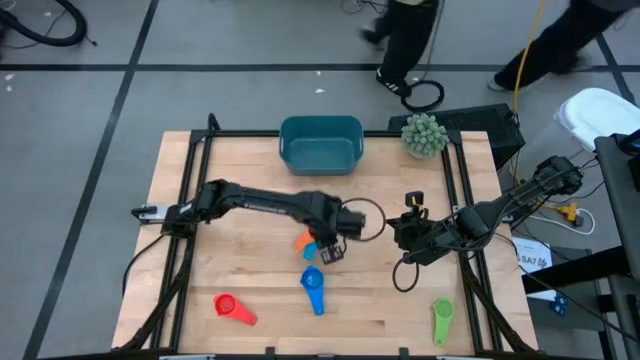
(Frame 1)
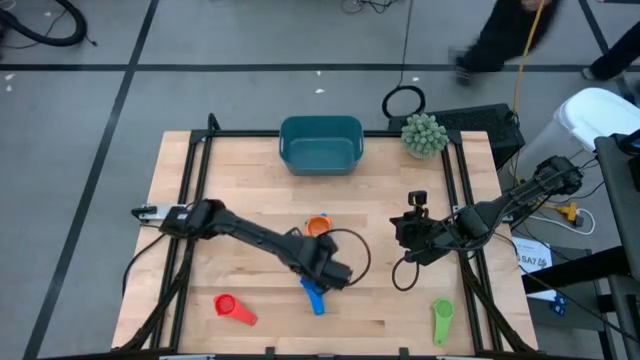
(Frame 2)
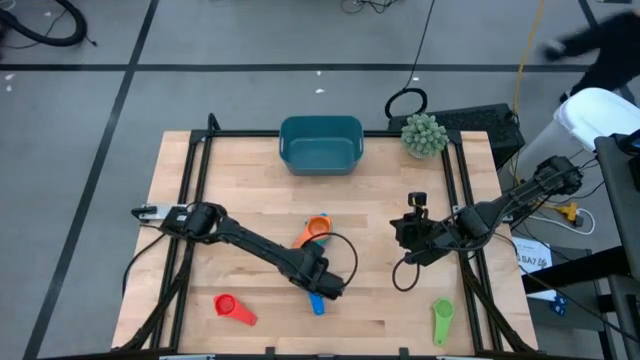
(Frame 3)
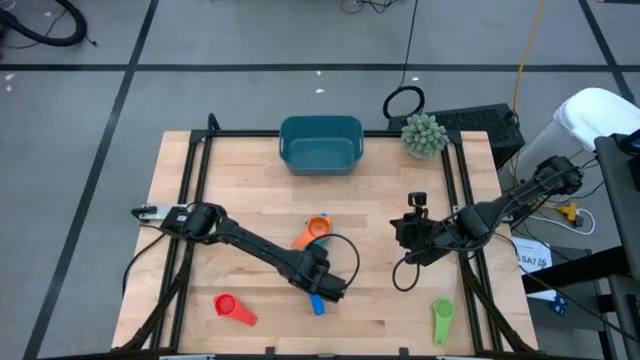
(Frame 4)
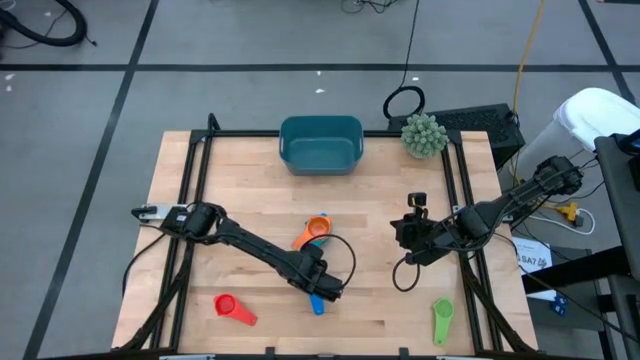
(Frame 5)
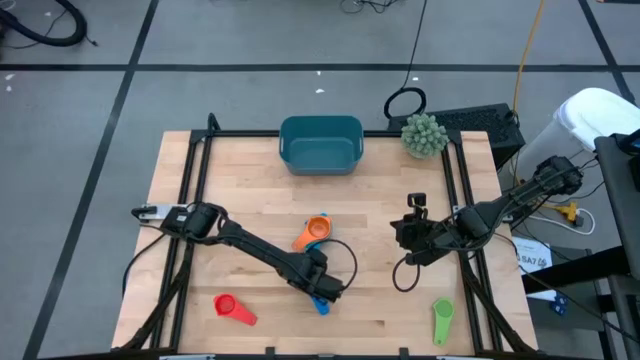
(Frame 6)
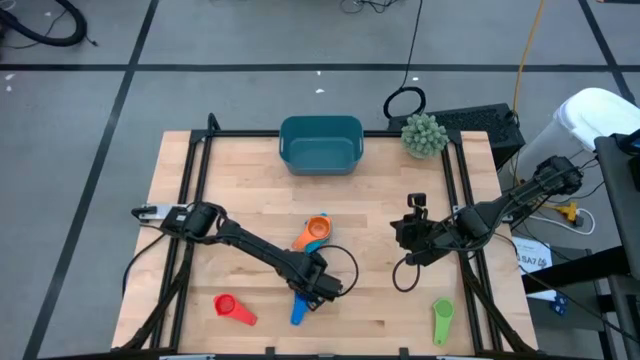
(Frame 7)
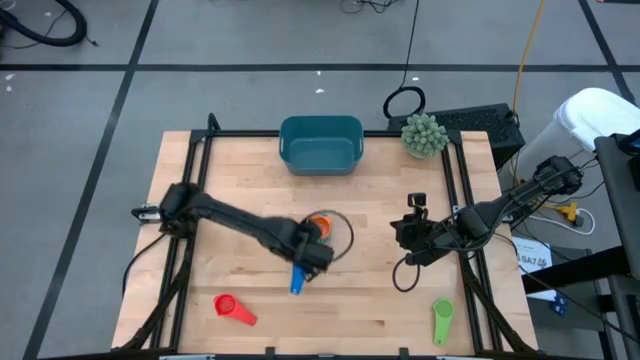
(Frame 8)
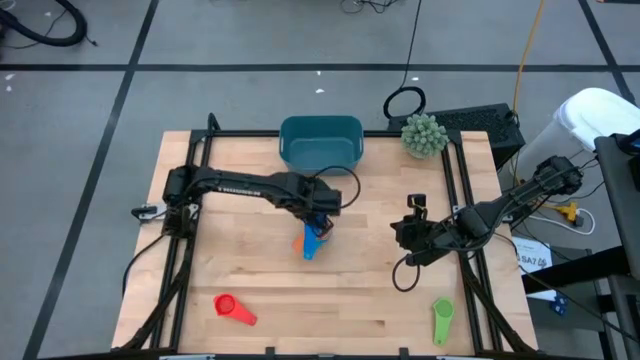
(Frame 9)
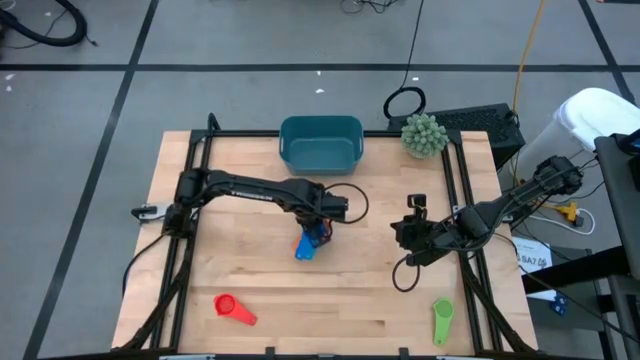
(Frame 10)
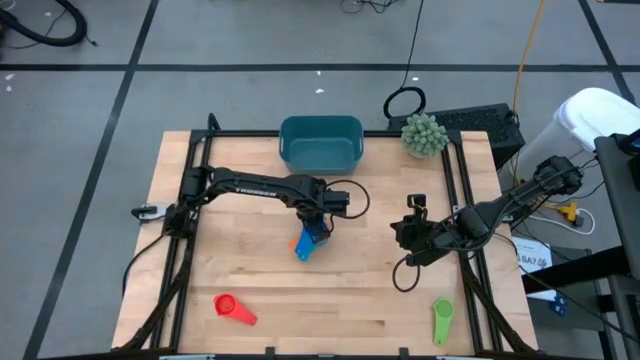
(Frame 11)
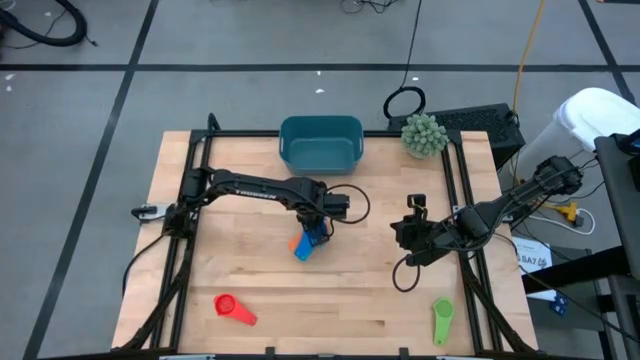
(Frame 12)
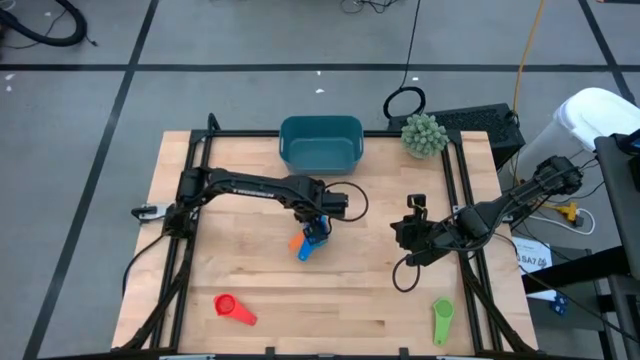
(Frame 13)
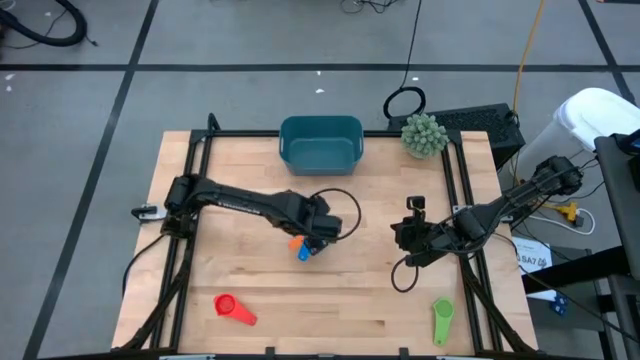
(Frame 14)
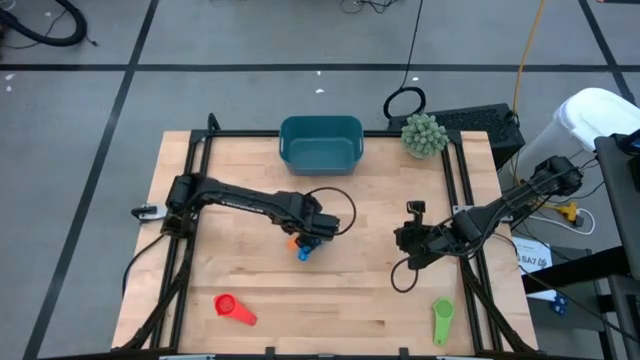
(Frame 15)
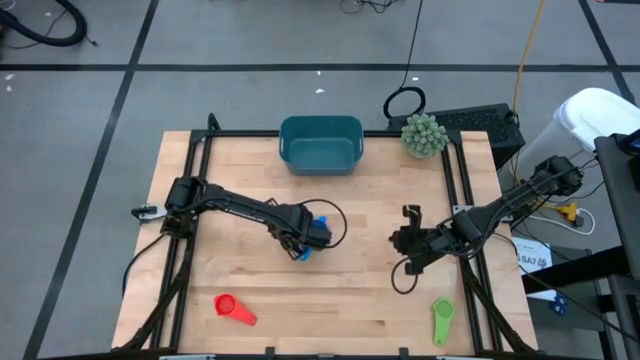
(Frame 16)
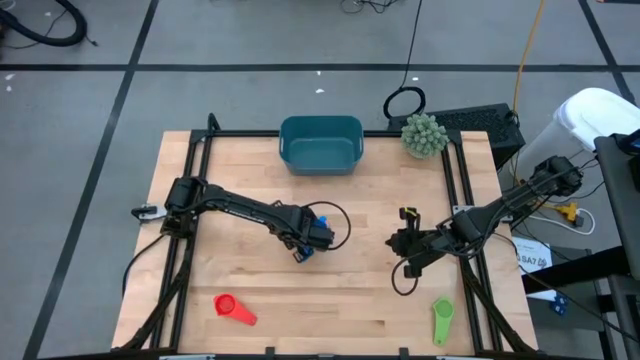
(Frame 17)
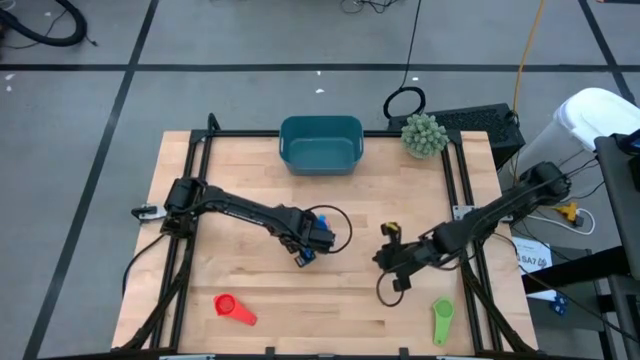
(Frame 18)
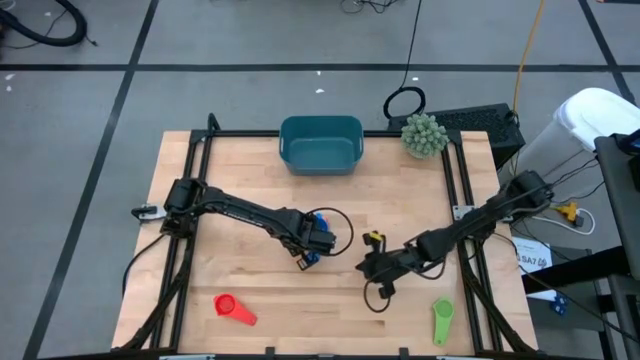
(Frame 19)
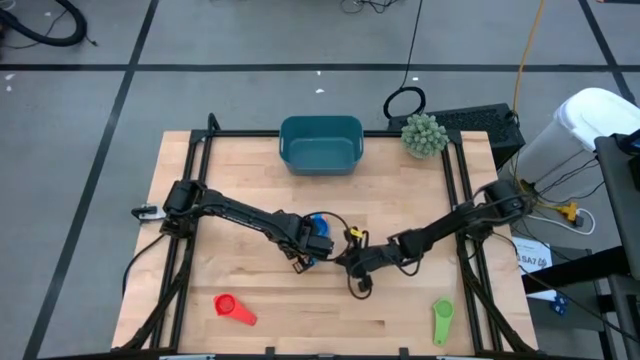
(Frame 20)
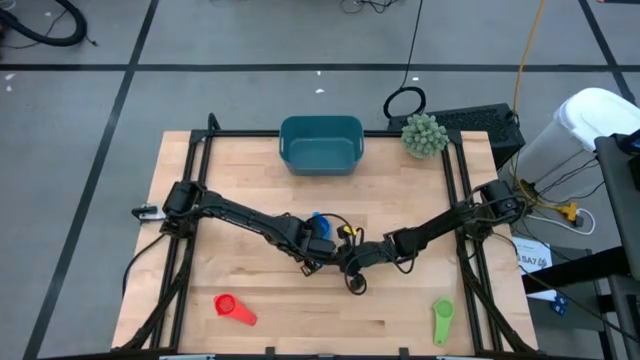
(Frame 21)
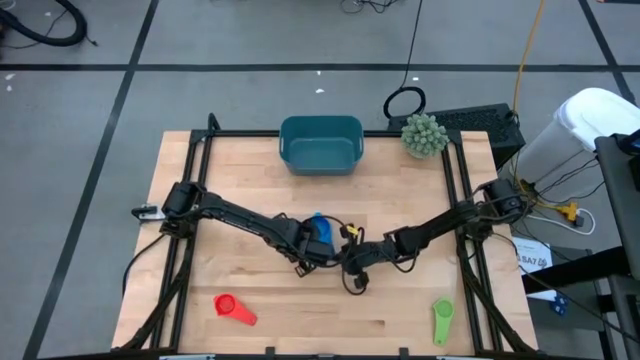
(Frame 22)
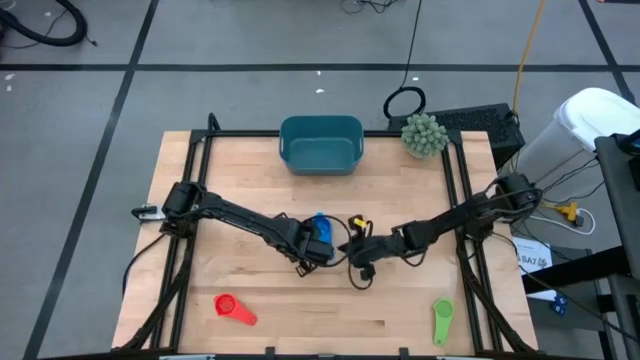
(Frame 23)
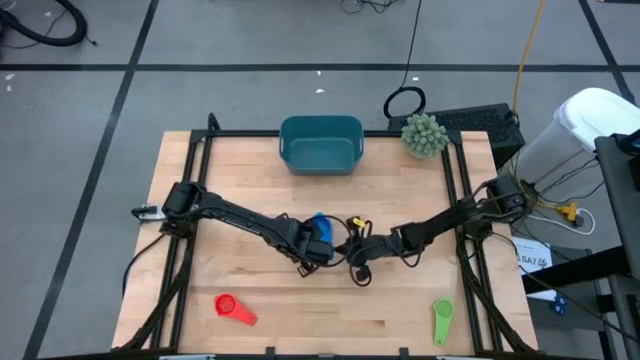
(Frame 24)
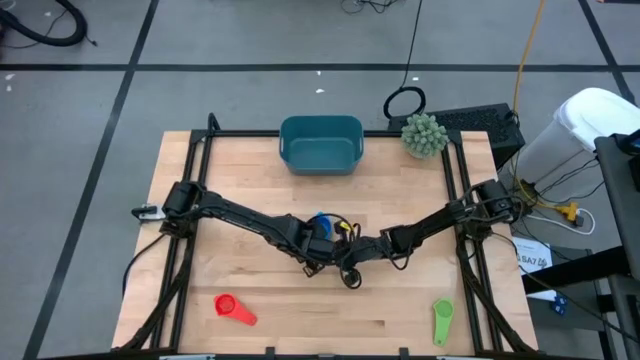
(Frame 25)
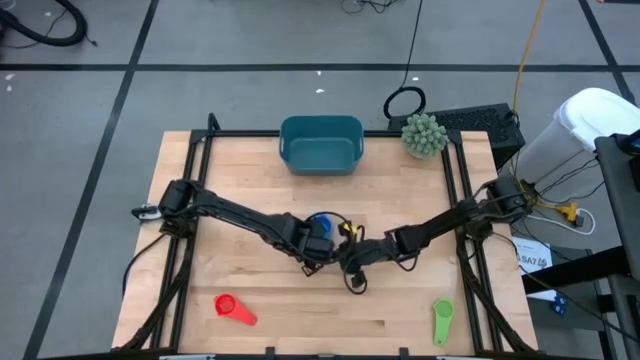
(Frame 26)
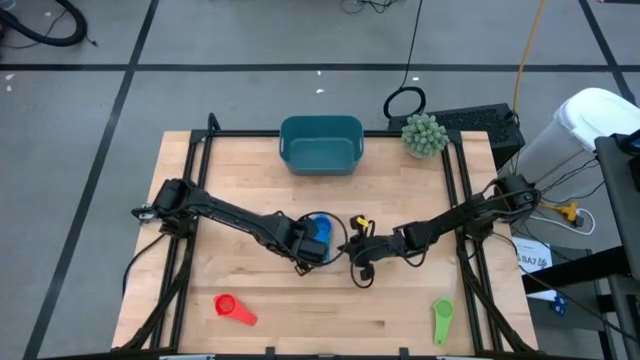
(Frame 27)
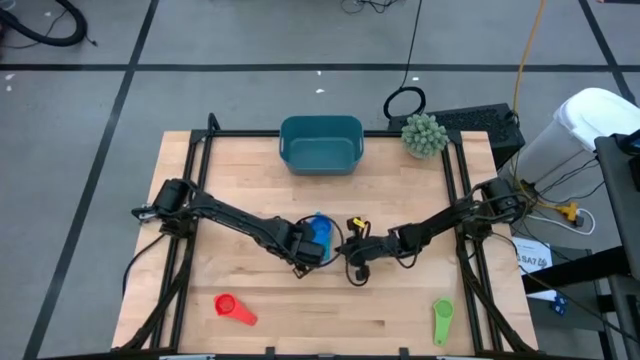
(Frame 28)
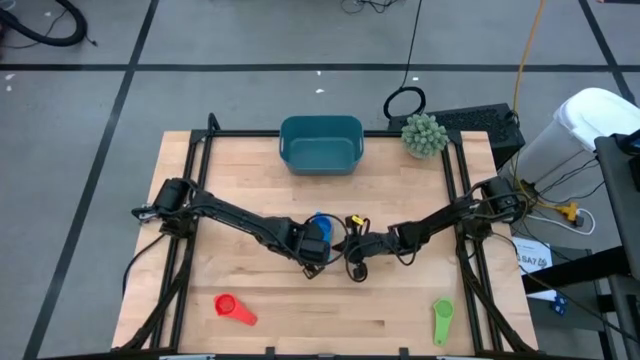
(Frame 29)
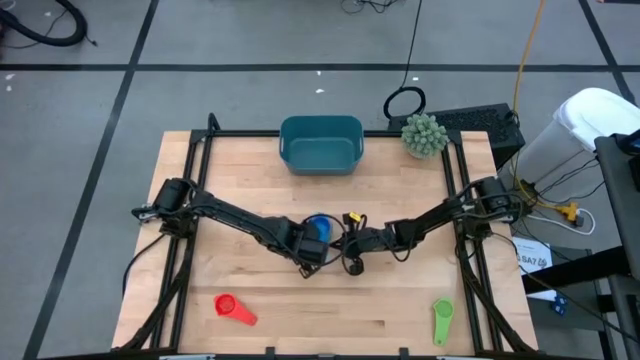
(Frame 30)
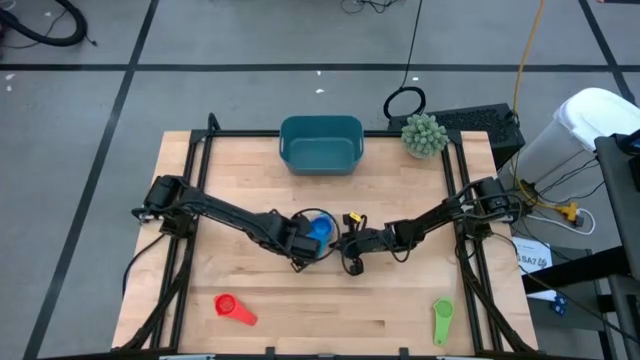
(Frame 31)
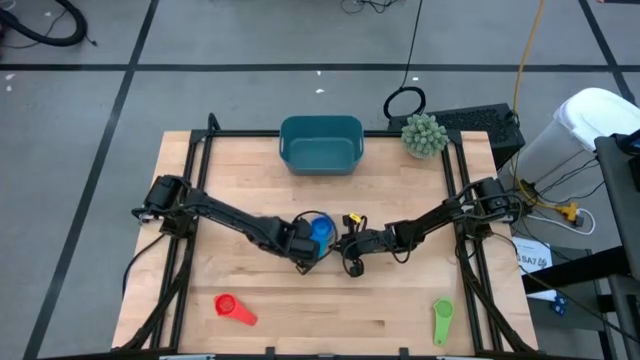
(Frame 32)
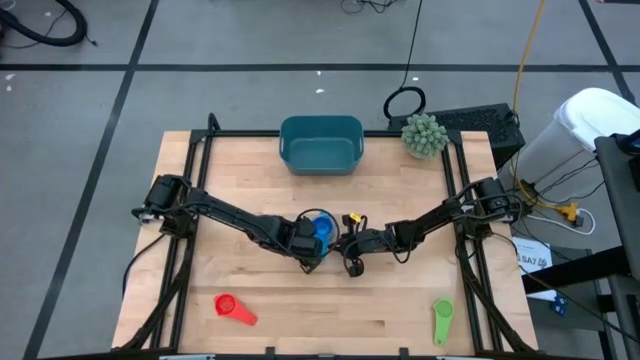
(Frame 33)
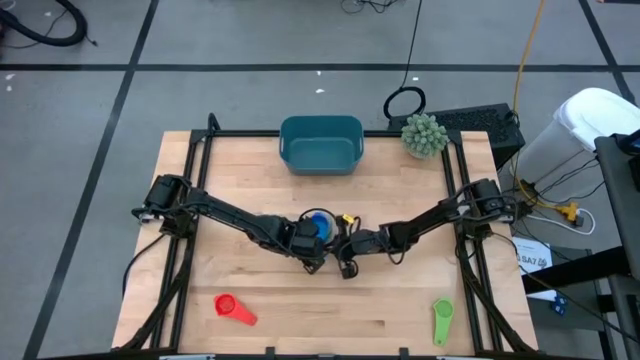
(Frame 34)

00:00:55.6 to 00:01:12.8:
Task: Nest measuring cups in basket
Stack the blue measuring cup on top of the orange measuring cup

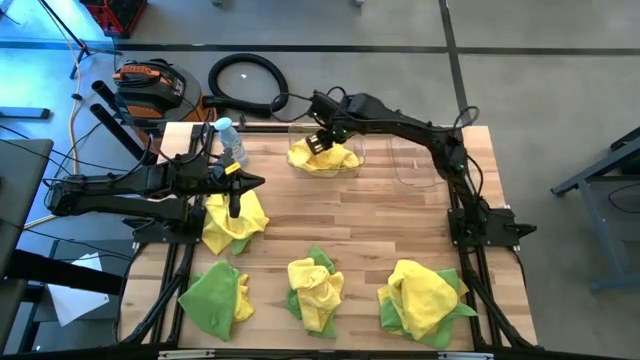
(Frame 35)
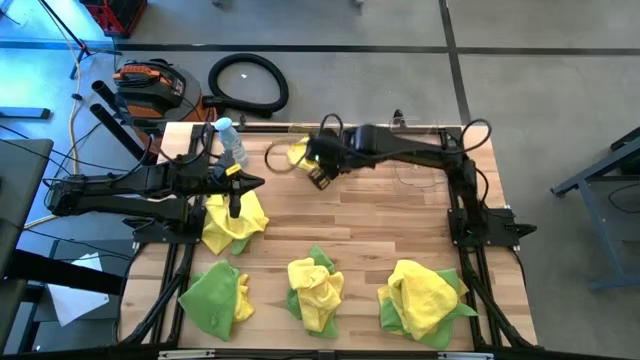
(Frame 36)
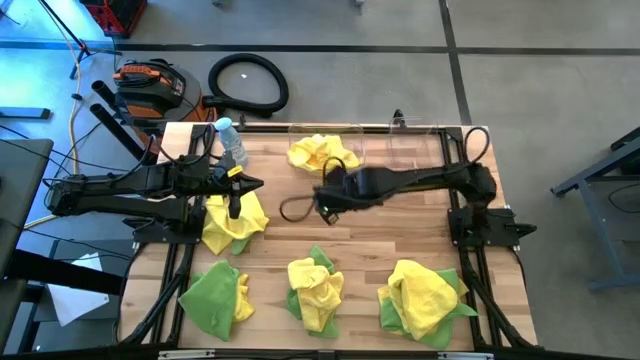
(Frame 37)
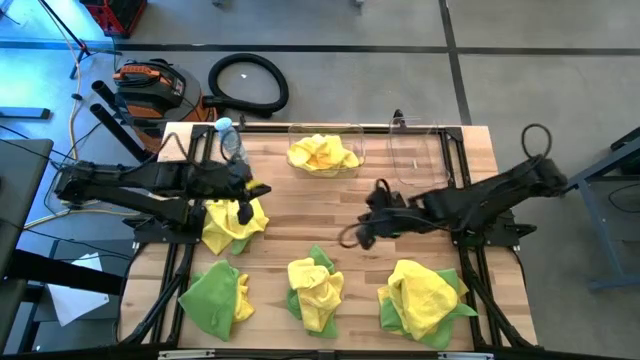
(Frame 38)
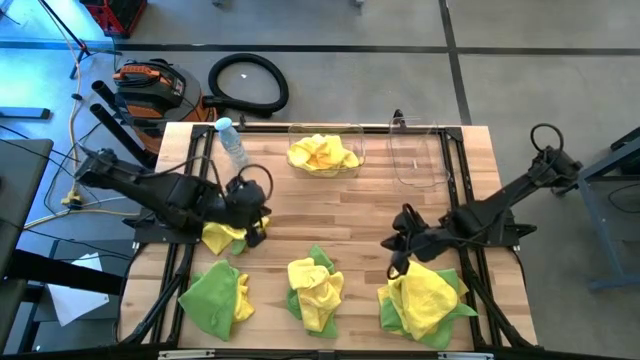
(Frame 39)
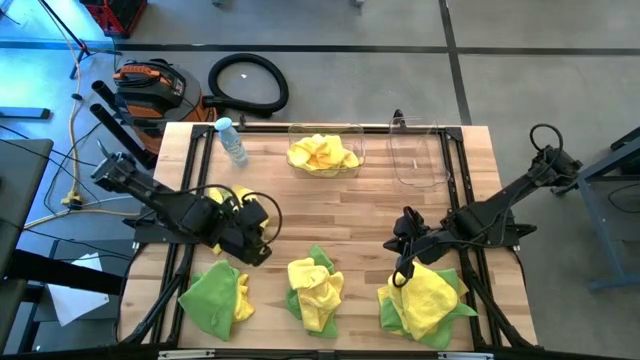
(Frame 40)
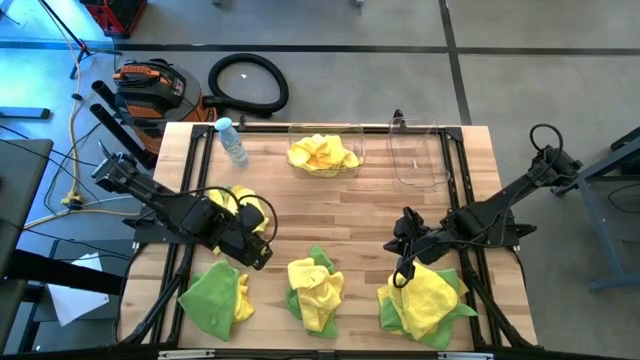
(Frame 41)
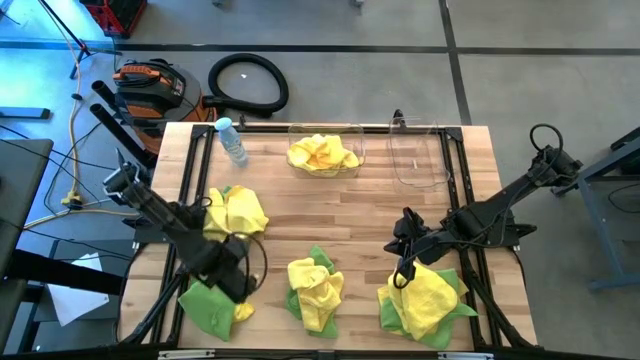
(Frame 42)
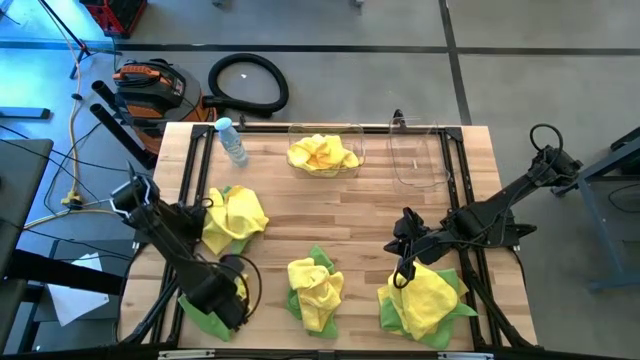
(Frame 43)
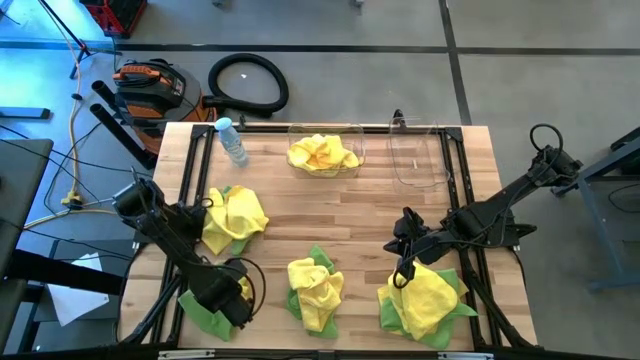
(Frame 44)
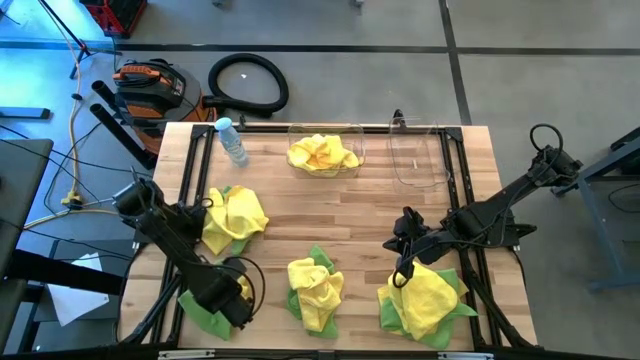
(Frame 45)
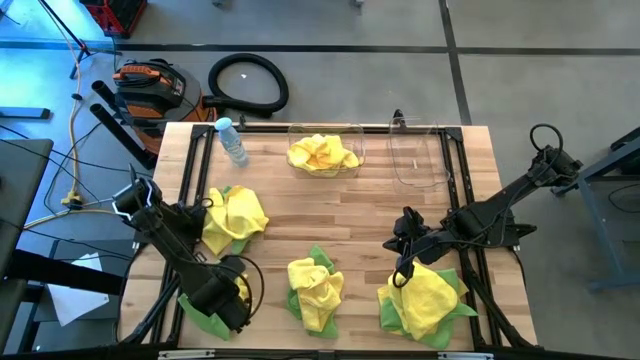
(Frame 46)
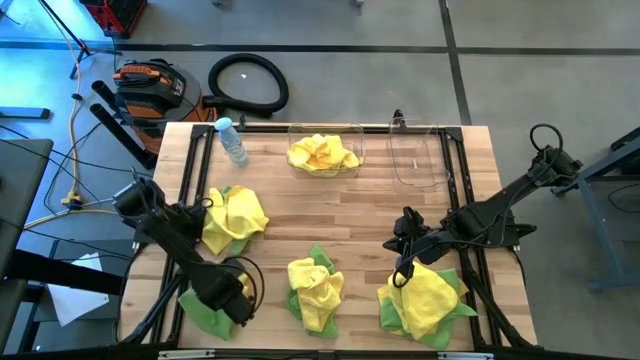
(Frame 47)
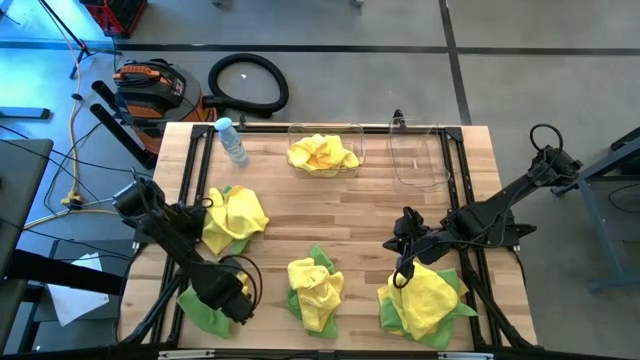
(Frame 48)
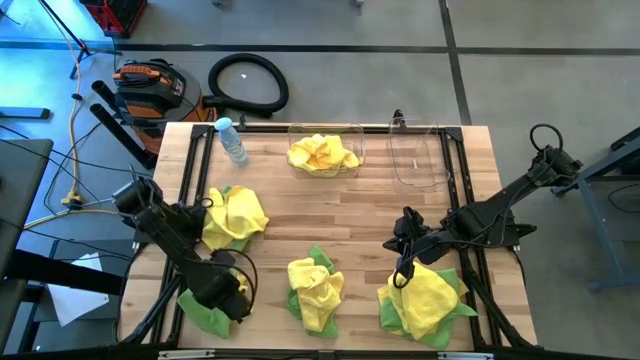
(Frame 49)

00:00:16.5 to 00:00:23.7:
Task: Sort microfiber towel by color & place in baskets
Put the bottom left green microfiber cloth into the right transparent bin
